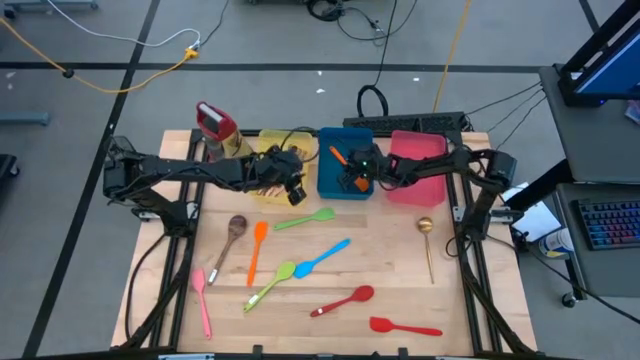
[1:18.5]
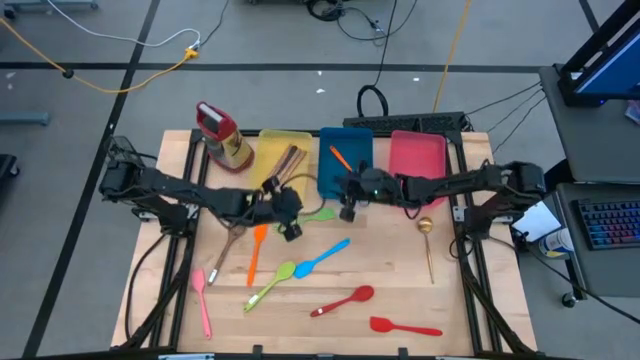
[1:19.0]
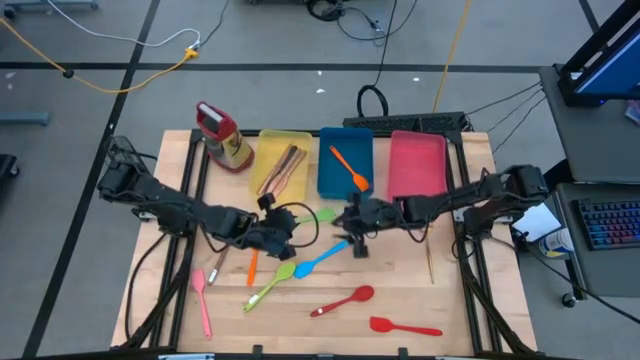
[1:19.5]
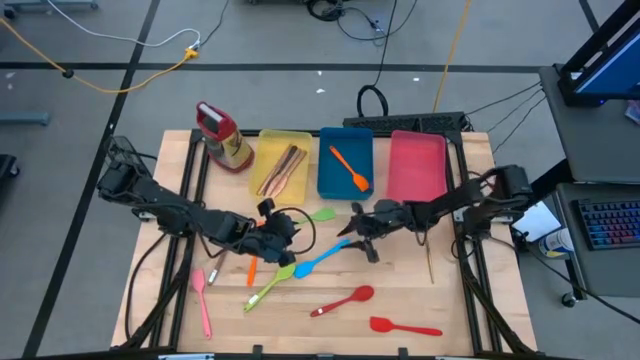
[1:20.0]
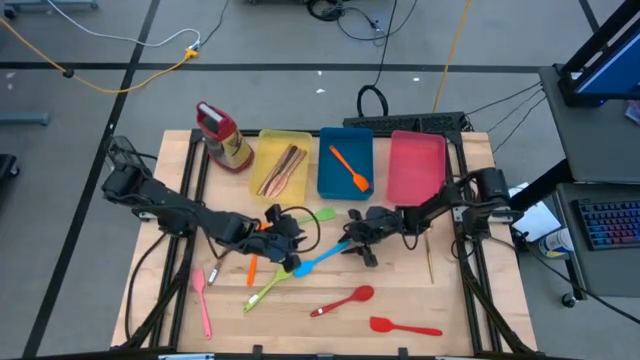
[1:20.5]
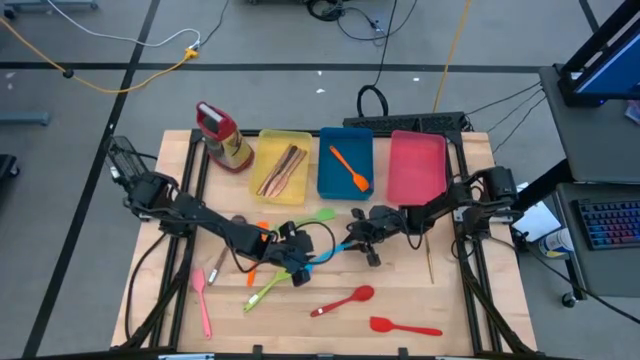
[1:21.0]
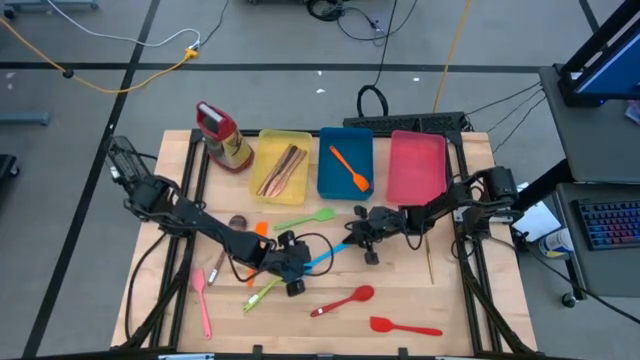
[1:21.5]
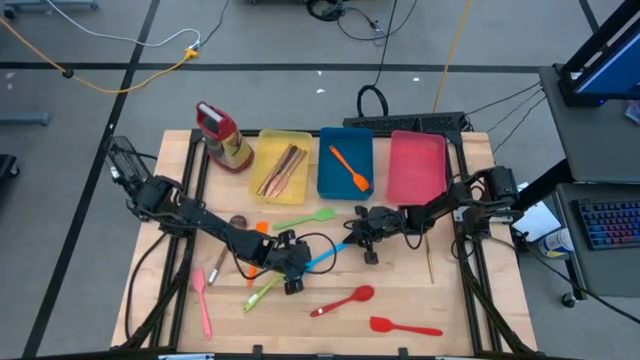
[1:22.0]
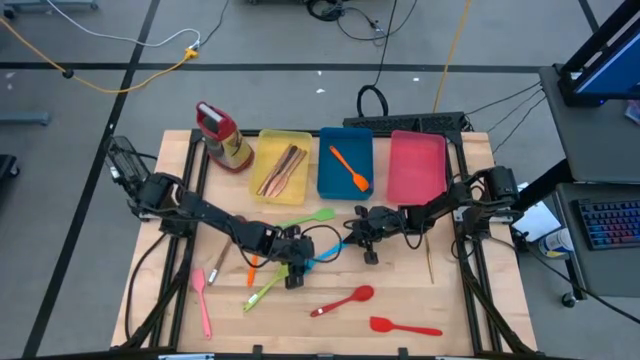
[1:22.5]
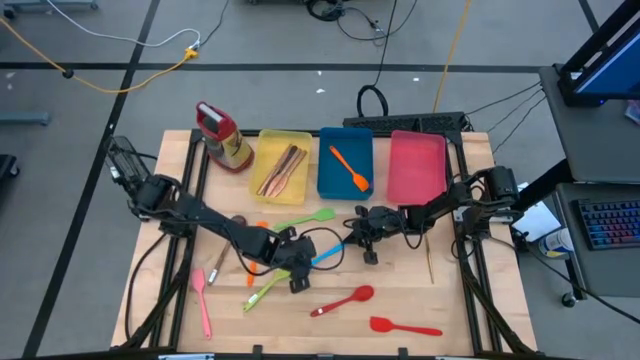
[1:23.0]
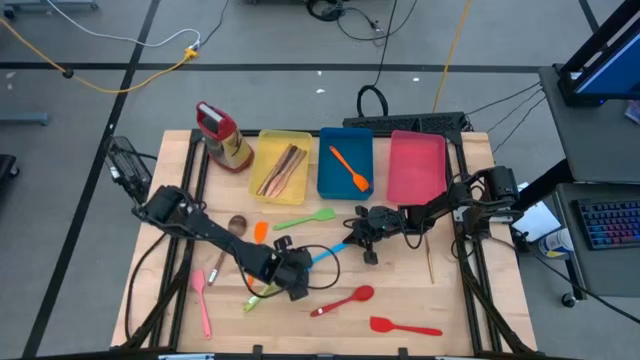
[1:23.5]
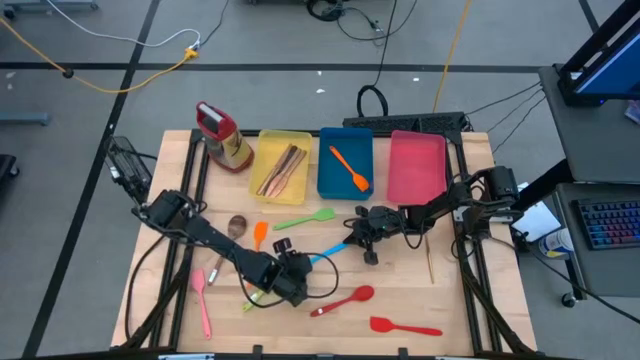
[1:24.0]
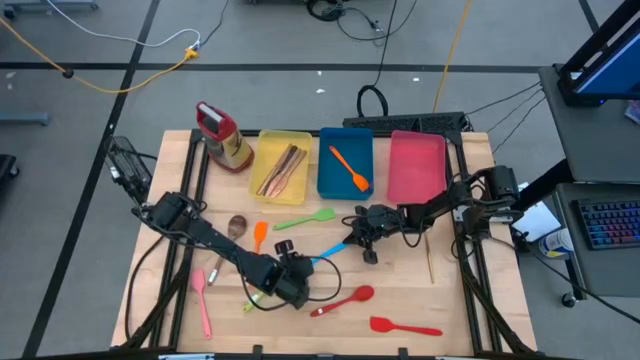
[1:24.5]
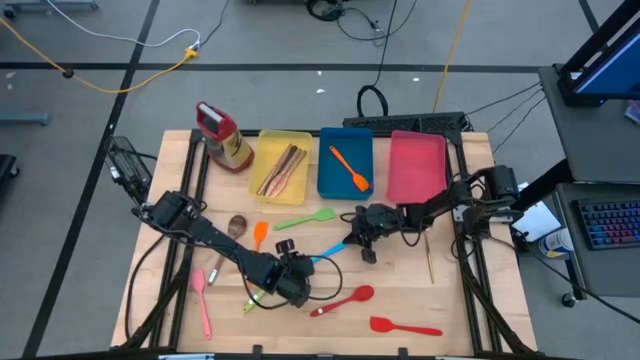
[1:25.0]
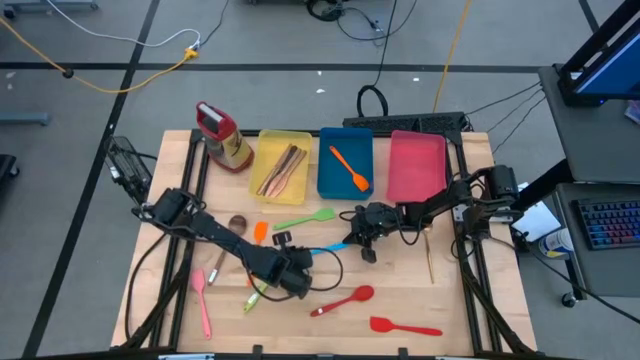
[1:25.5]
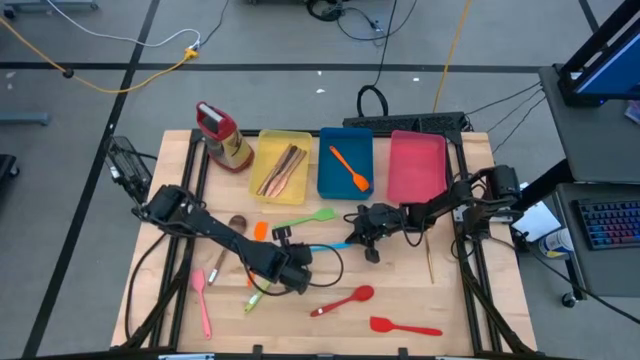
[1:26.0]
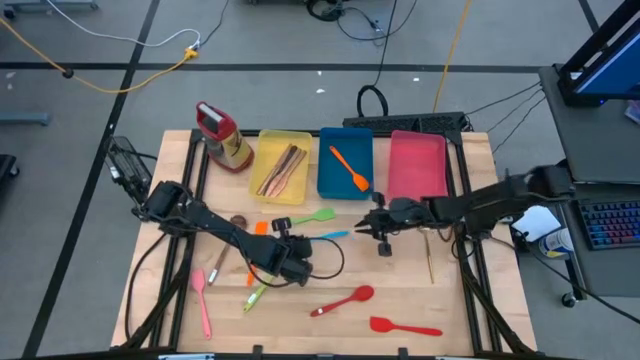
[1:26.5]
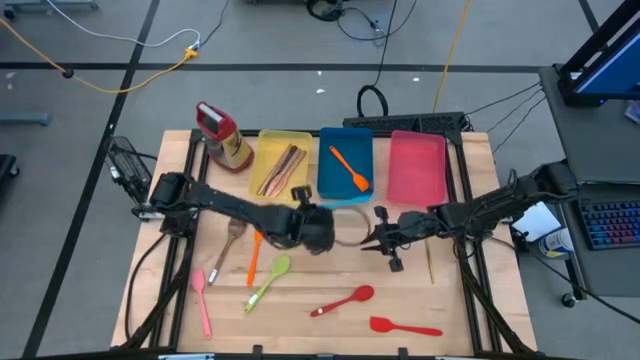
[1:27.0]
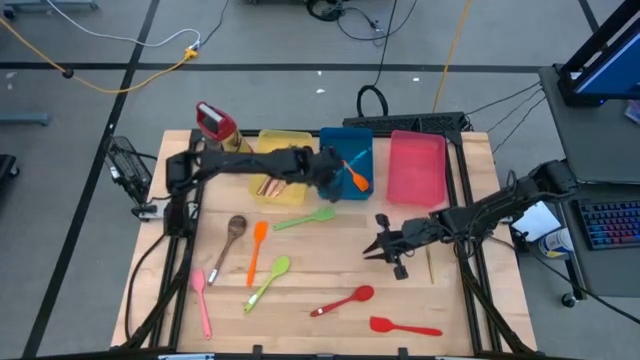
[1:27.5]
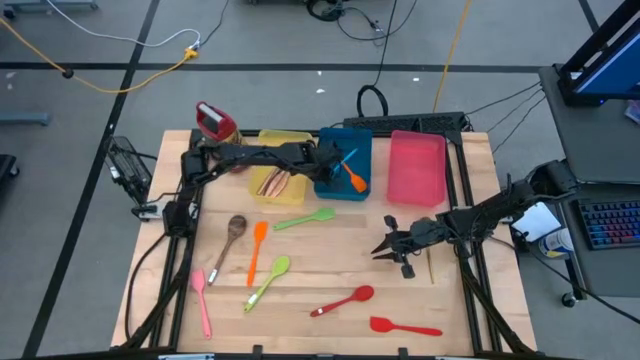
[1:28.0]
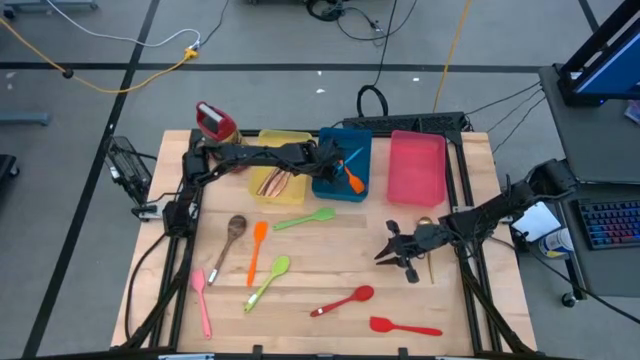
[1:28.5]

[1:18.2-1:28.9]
Task: Pick & Place Kitchen Items
Put the blue spatula into the blue bin

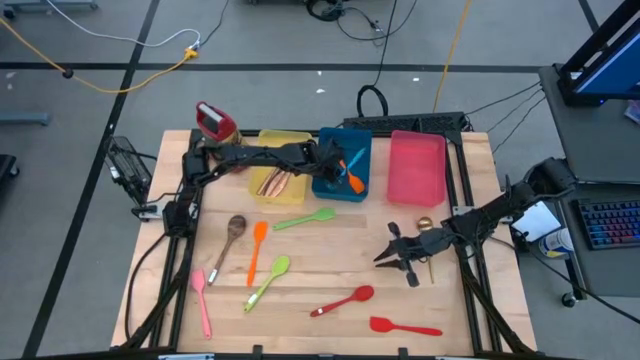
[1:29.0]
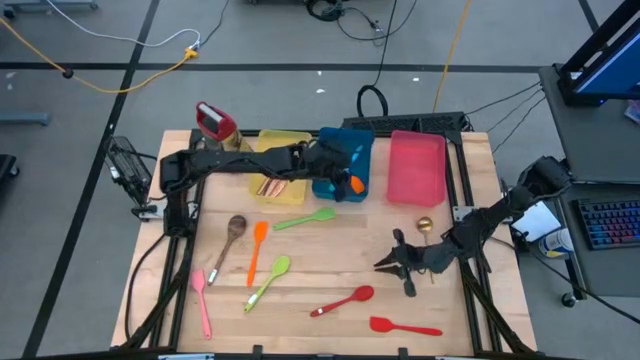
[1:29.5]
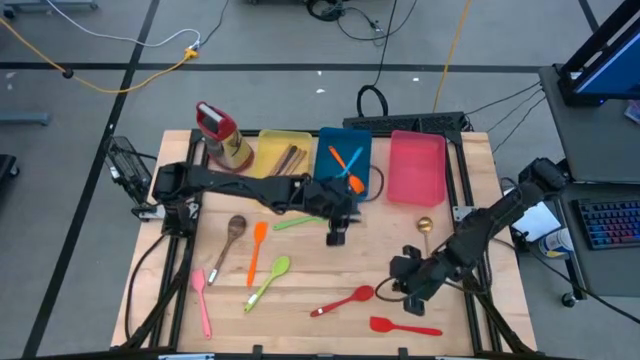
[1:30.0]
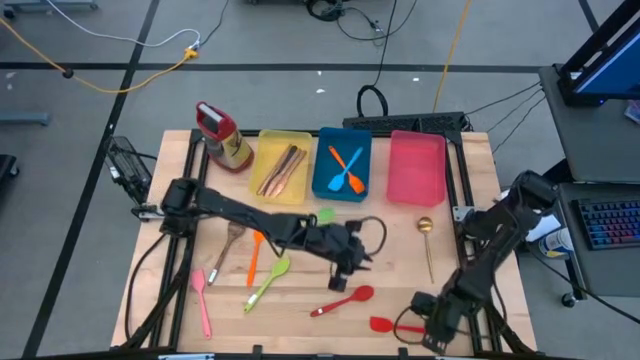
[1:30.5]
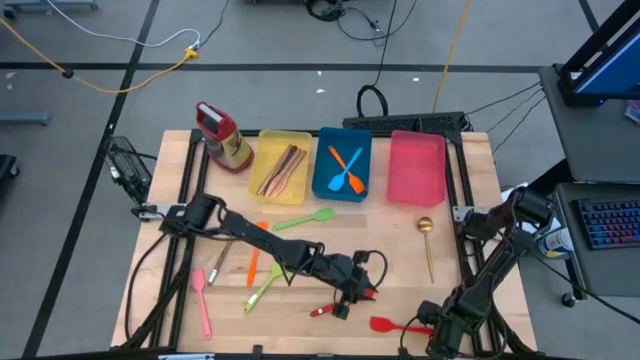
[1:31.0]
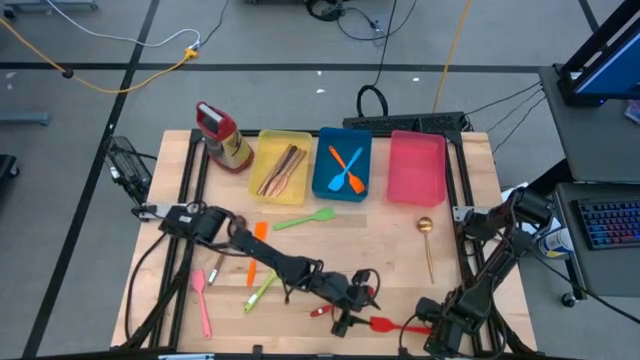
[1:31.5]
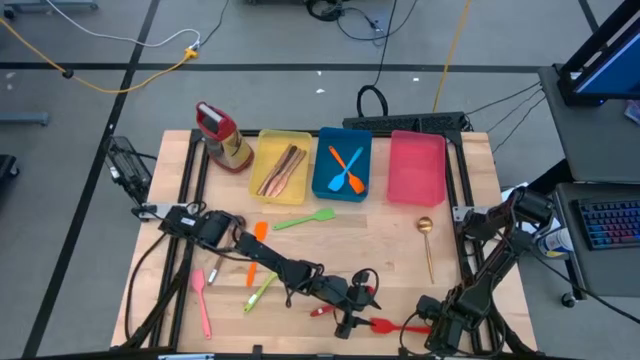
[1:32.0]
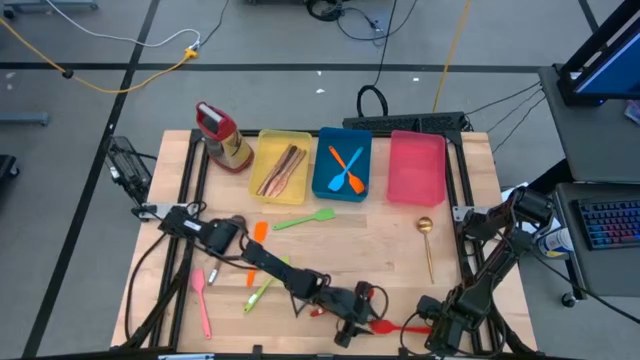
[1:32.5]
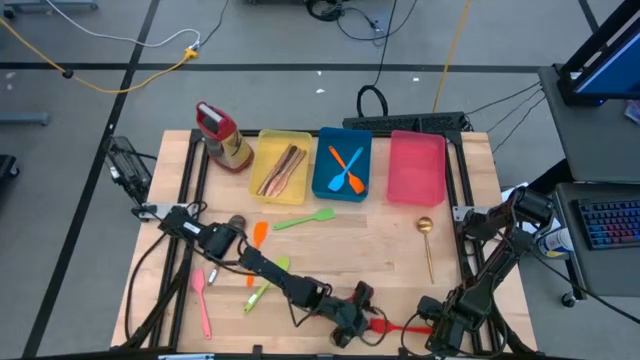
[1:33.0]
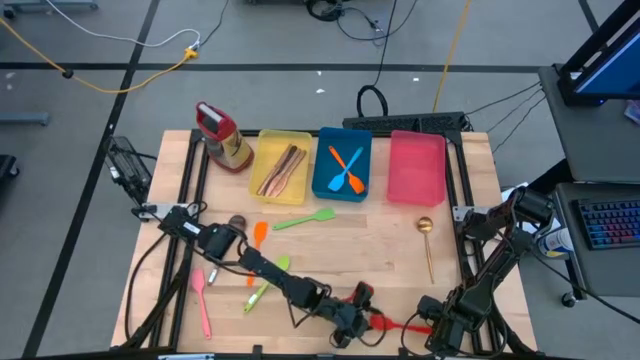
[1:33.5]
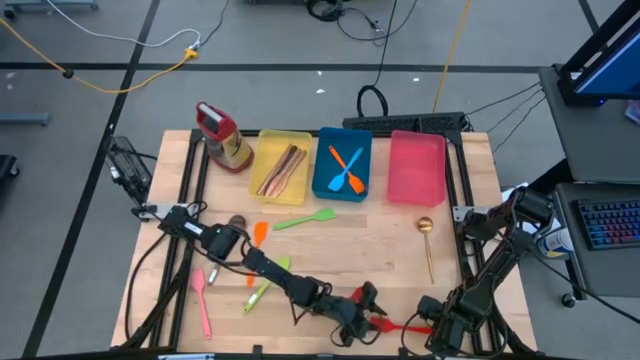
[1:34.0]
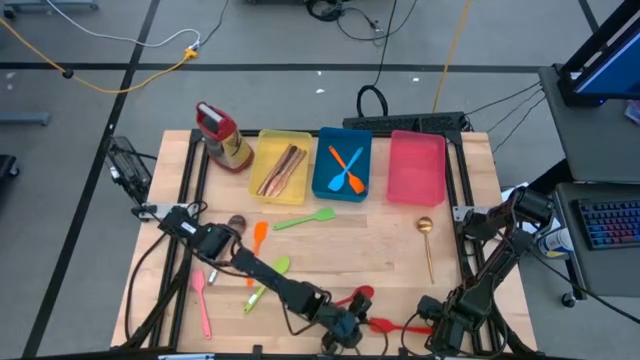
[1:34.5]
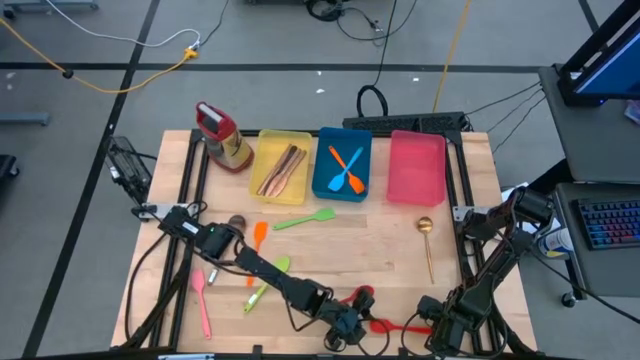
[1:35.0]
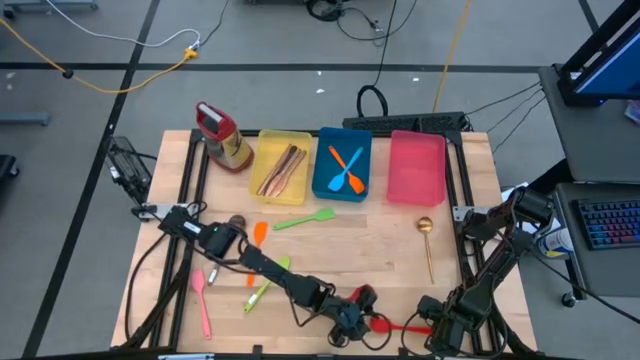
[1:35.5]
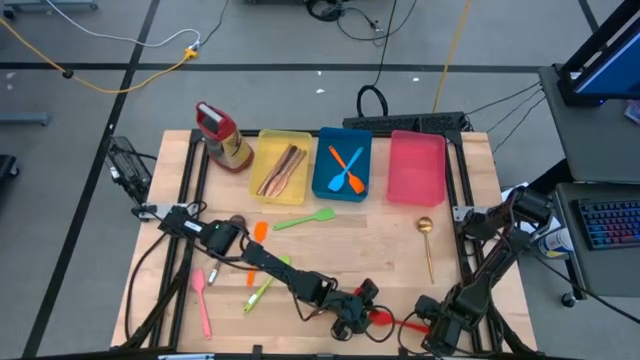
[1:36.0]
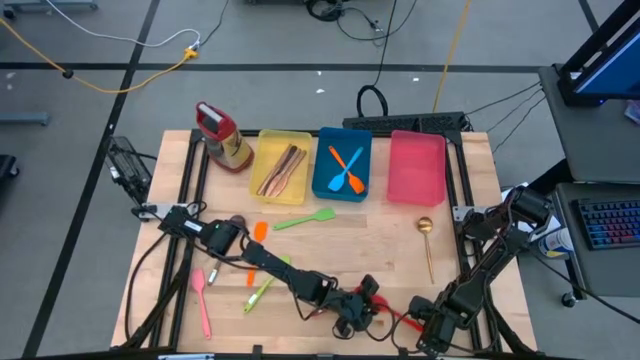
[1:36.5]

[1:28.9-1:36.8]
Put the red spatula into the blue bin

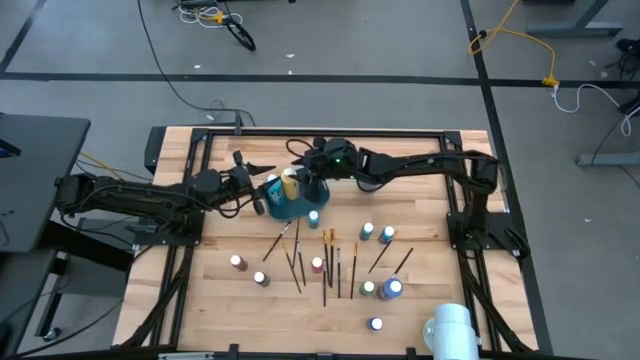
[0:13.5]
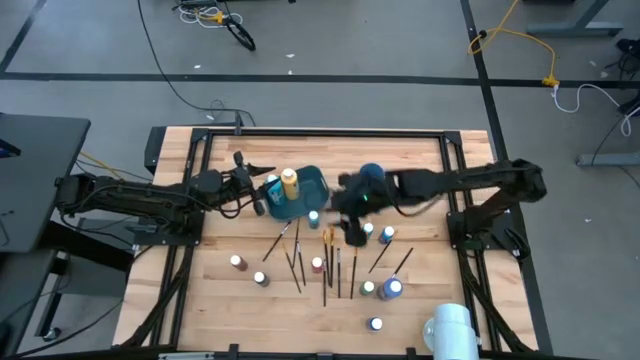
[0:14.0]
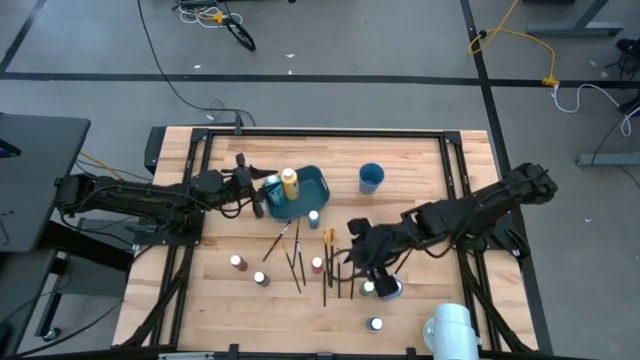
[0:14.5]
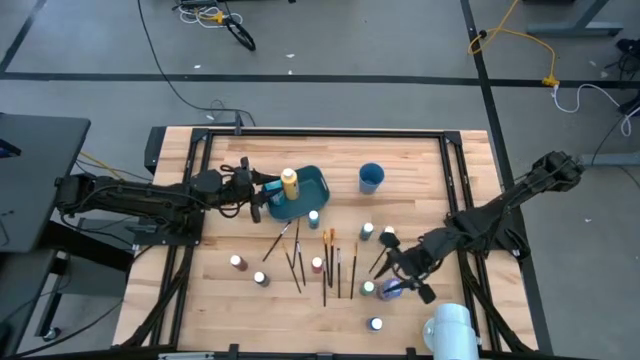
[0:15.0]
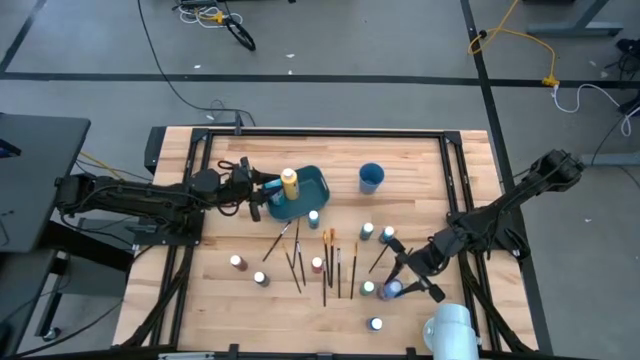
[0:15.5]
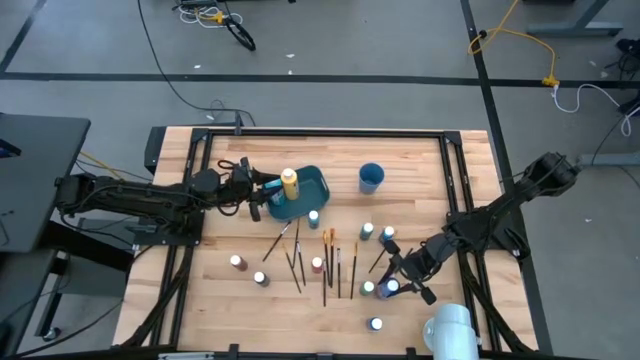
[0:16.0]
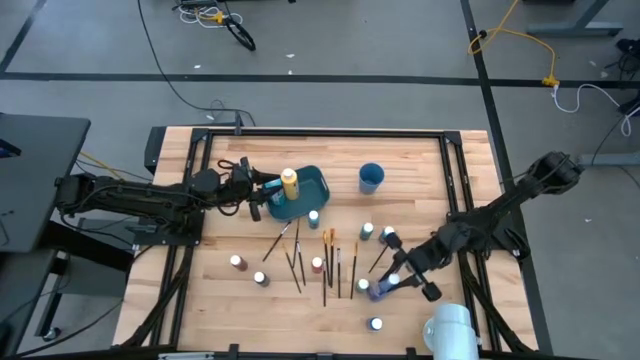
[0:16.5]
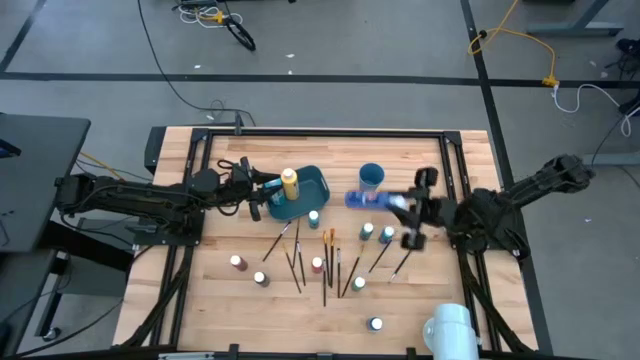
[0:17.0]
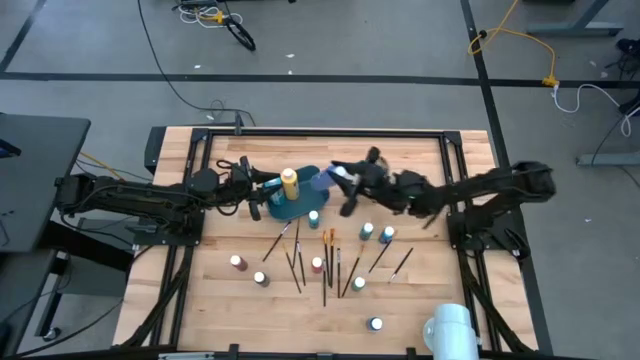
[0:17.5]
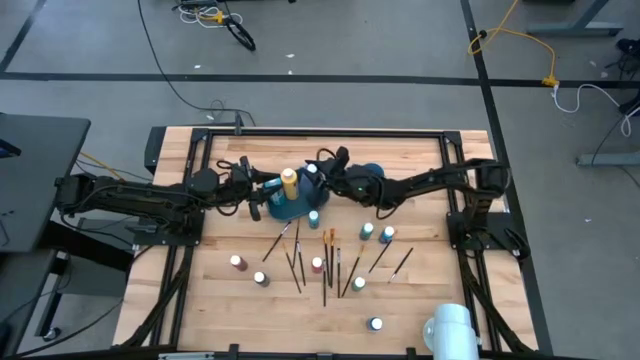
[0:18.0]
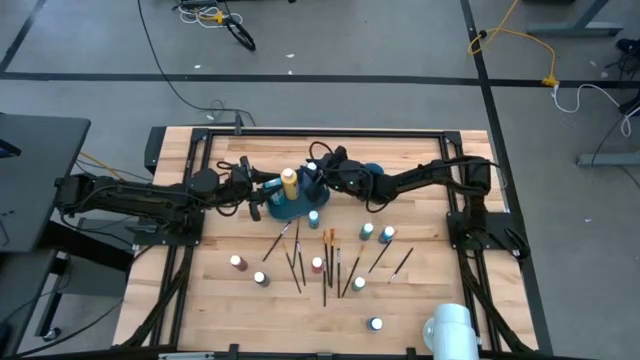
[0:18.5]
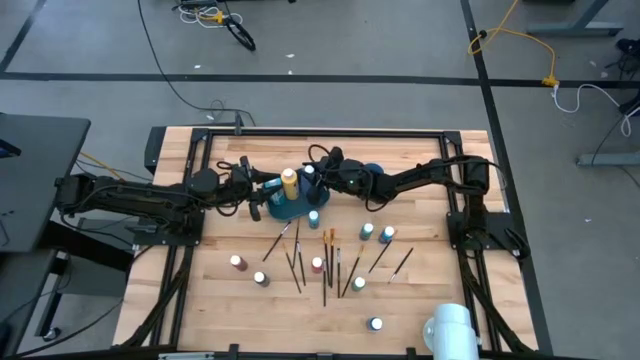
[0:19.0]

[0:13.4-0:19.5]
Task: Pick & Place Paint Supplies
Put the large blue paint bottle into the blue bin
